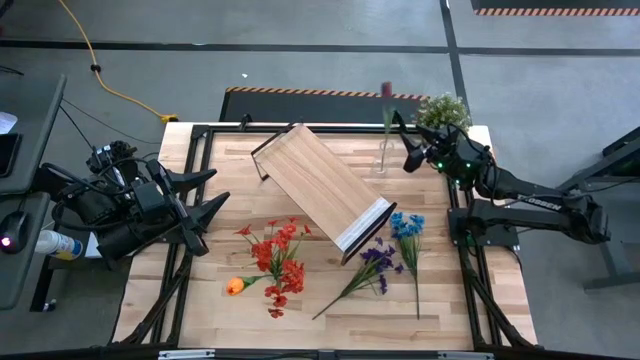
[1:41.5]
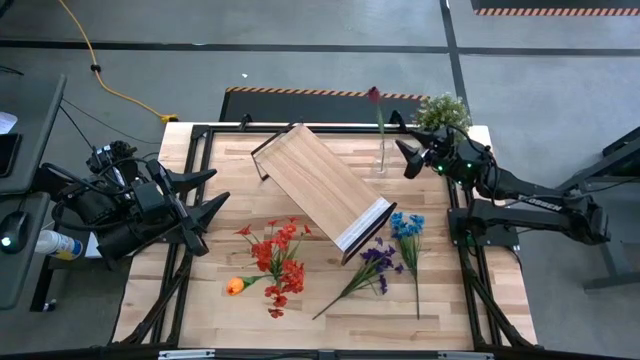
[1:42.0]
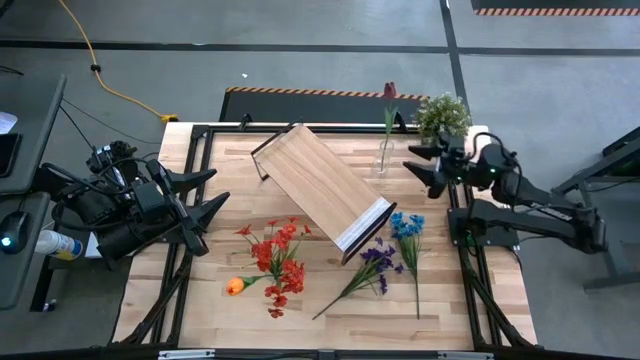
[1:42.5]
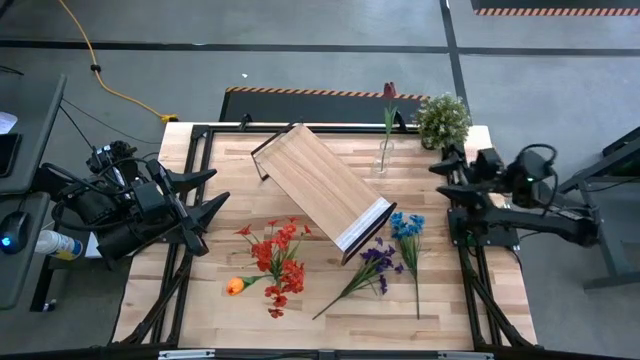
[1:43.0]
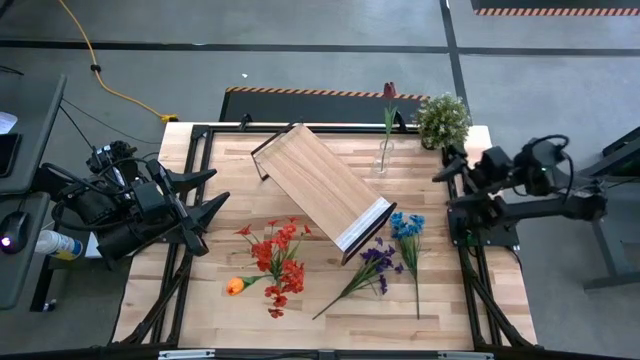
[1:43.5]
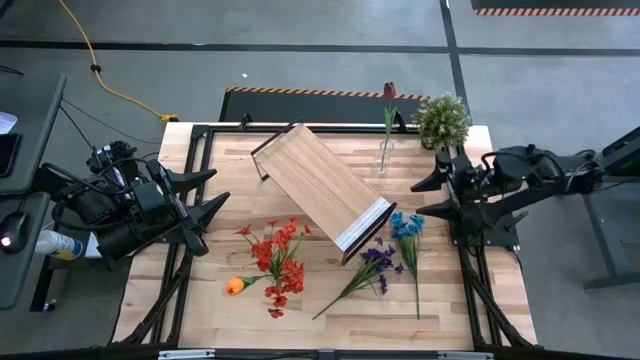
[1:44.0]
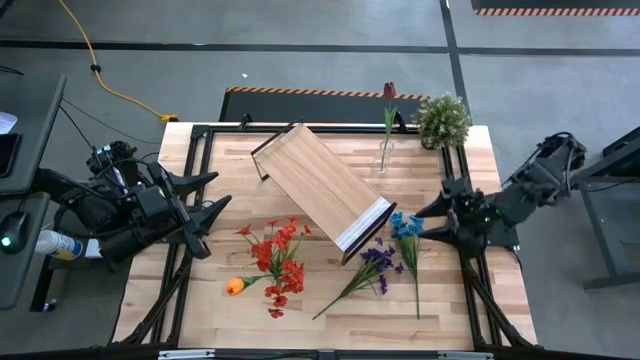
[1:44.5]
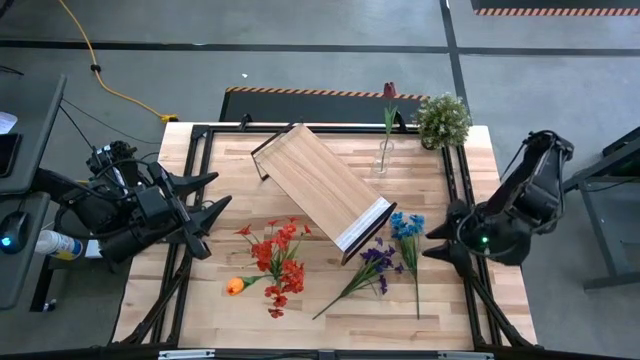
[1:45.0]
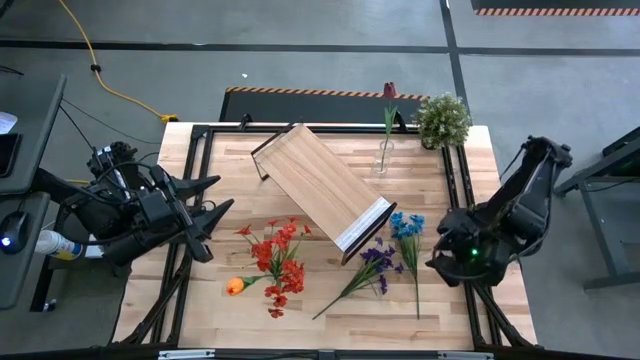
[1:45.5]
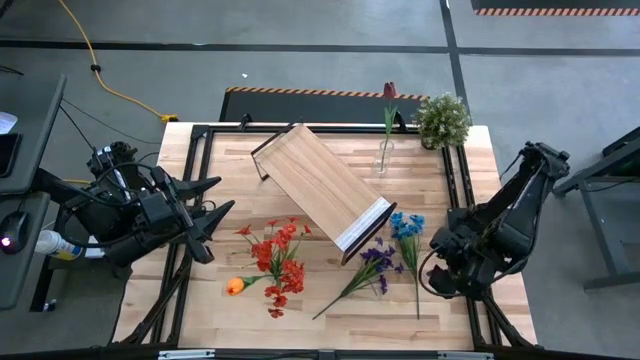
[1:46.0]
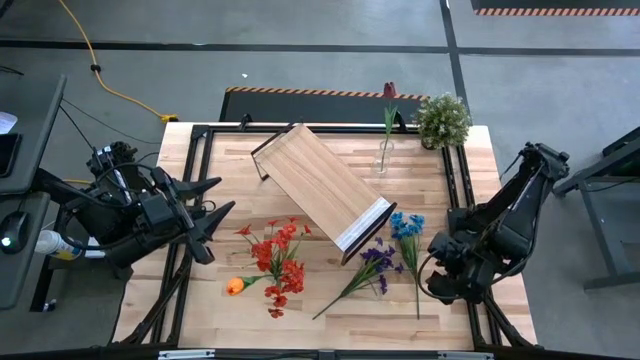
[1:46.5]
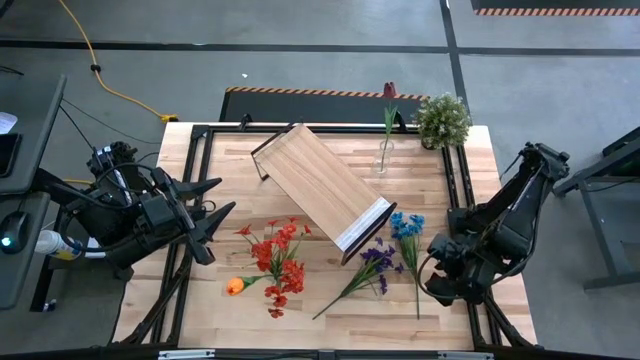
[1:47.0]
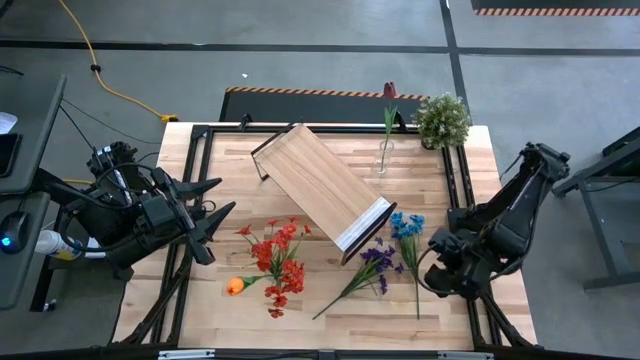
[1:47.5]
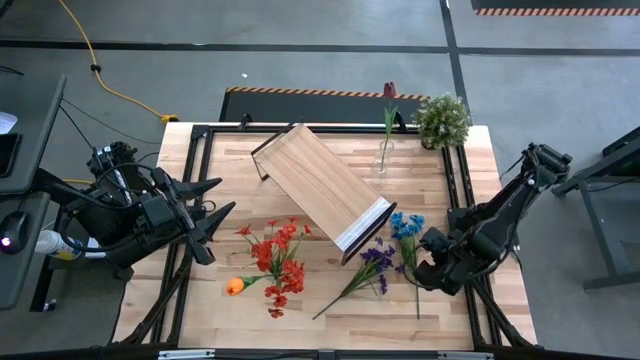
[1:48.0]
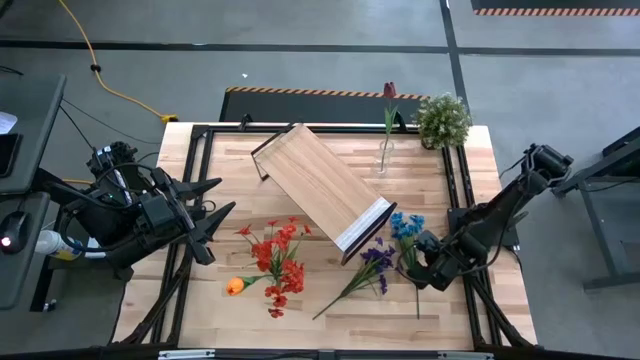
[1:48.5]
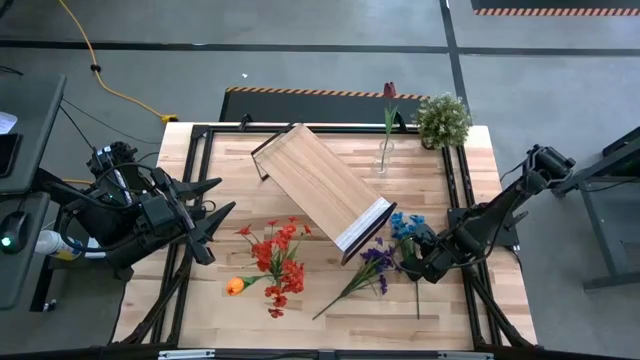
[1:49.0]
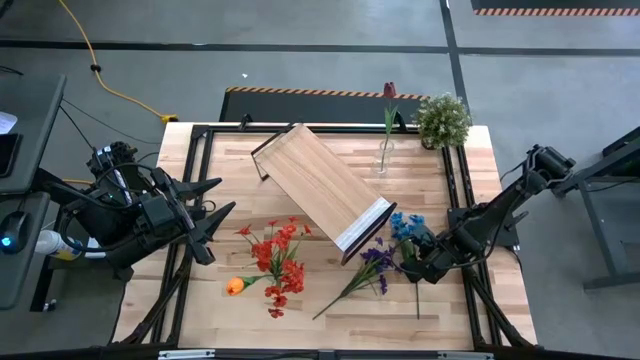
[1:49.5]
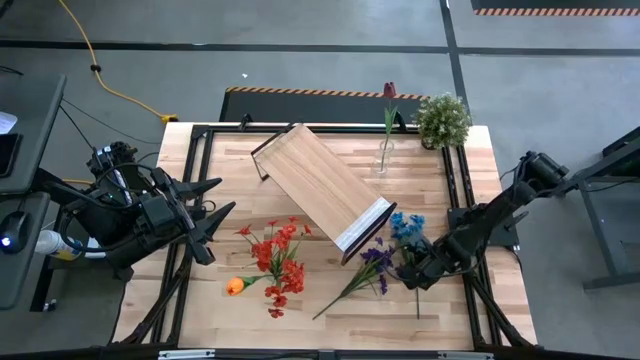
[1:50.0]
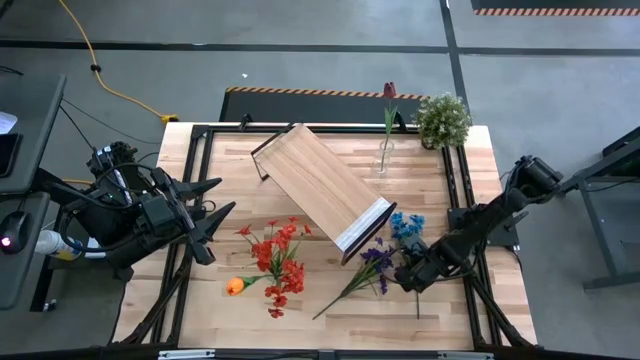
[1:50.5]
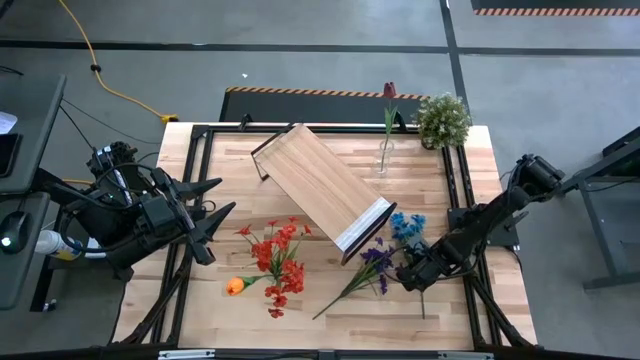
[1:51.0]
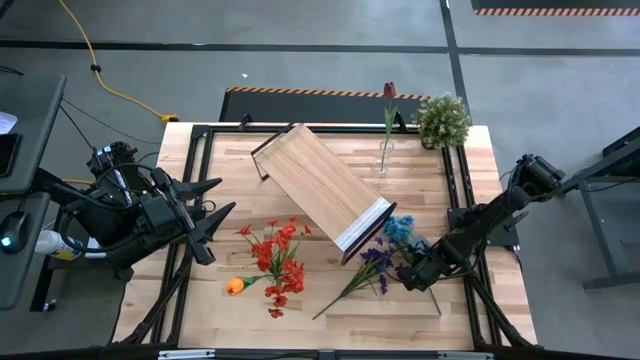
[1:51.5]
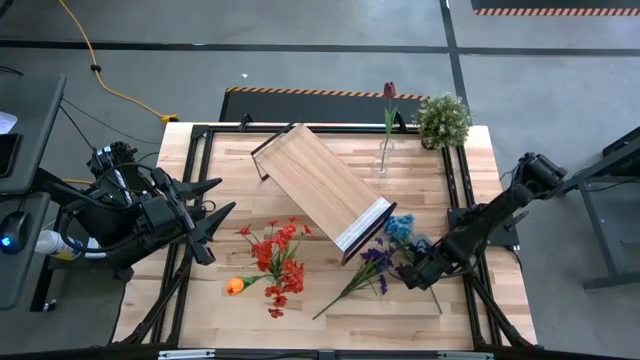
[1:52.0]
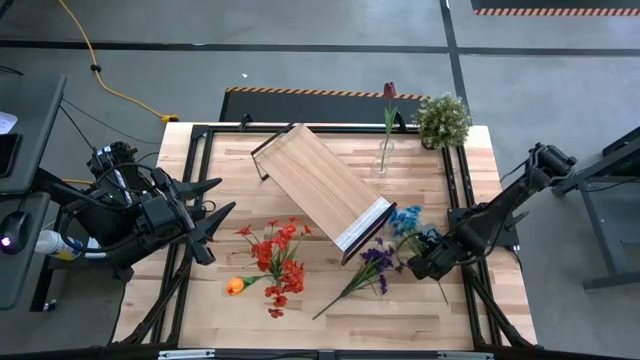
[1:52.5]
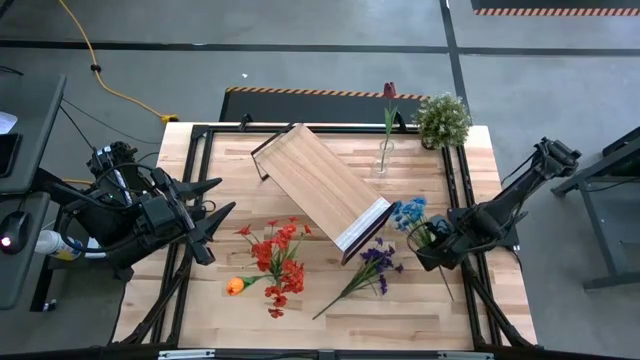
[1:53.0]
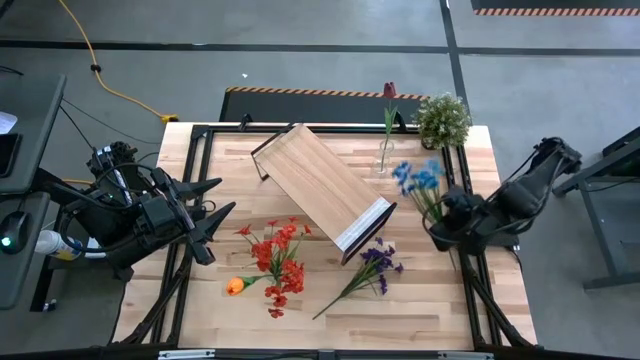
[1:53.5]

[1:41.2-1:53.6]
Task: Pick and place flowers into a vace then onto a shelf
Put the blue flowers into the top transparent vase

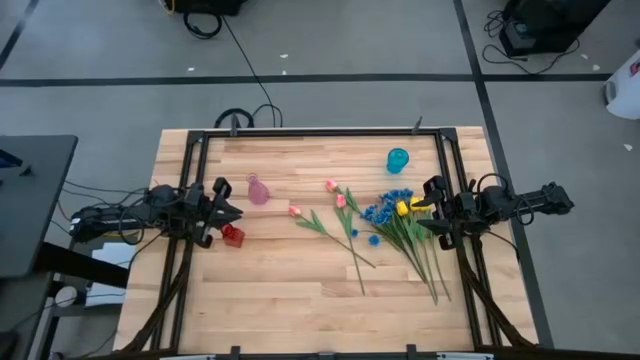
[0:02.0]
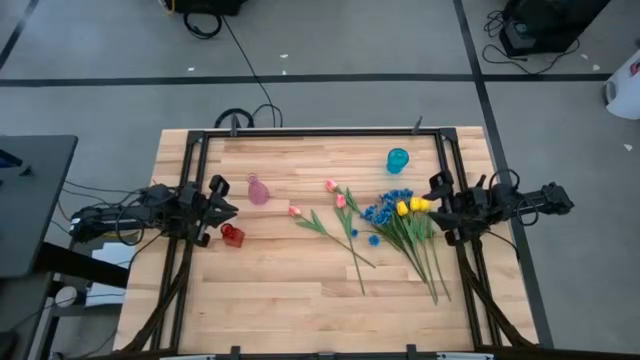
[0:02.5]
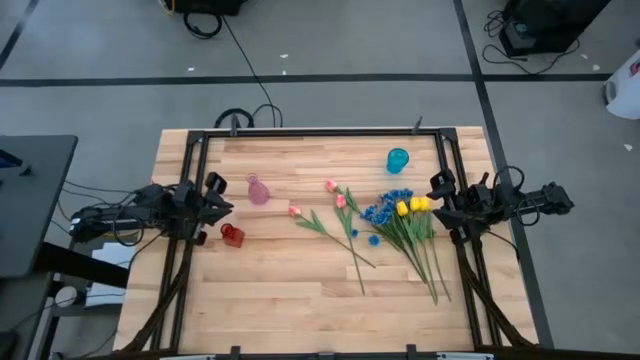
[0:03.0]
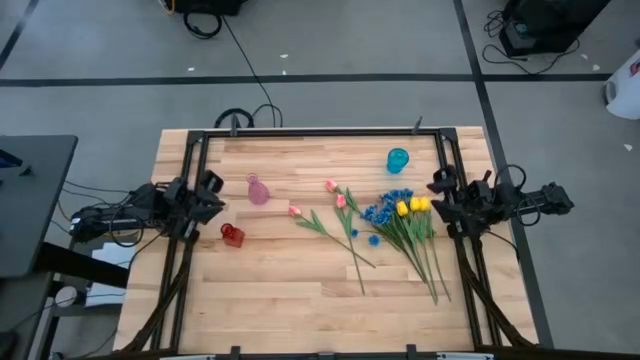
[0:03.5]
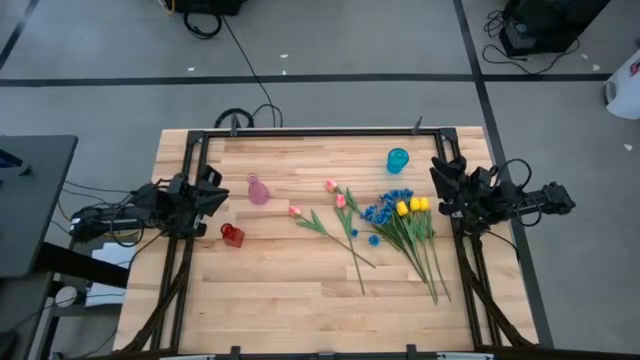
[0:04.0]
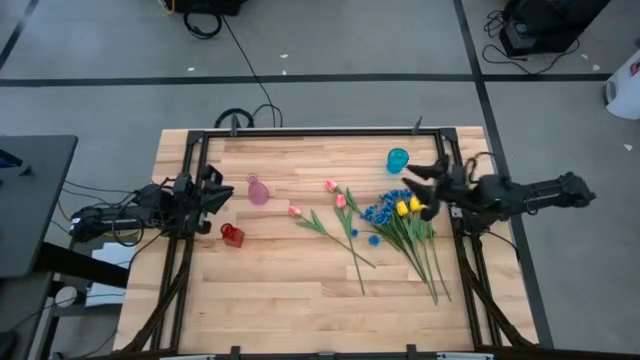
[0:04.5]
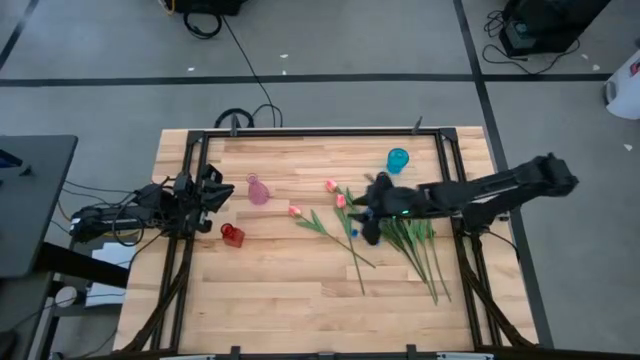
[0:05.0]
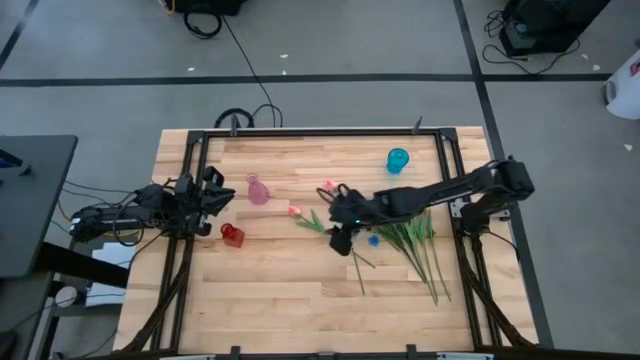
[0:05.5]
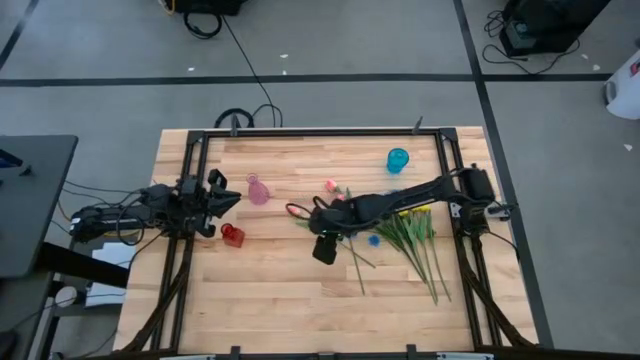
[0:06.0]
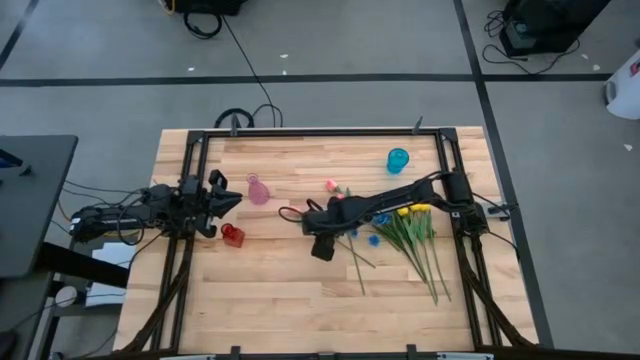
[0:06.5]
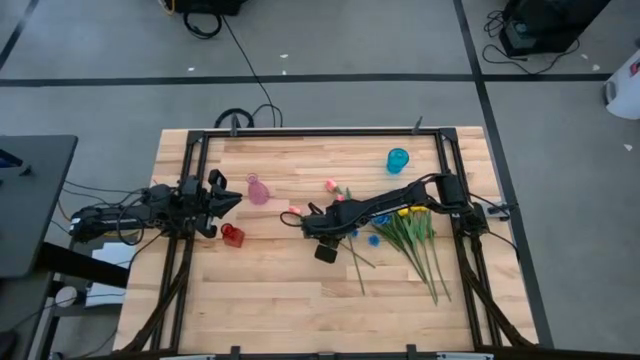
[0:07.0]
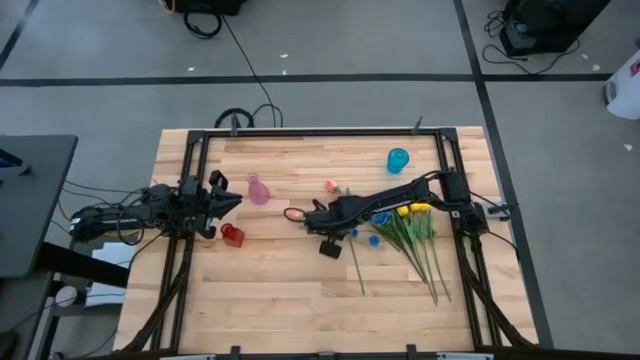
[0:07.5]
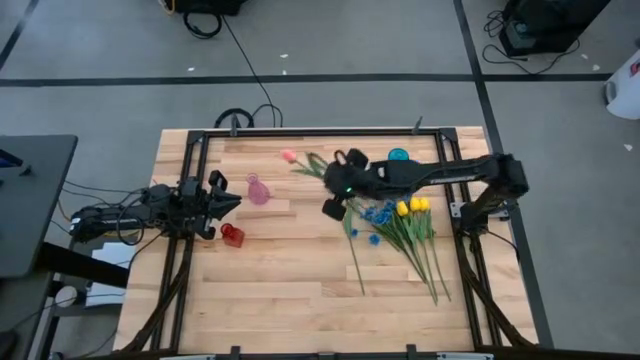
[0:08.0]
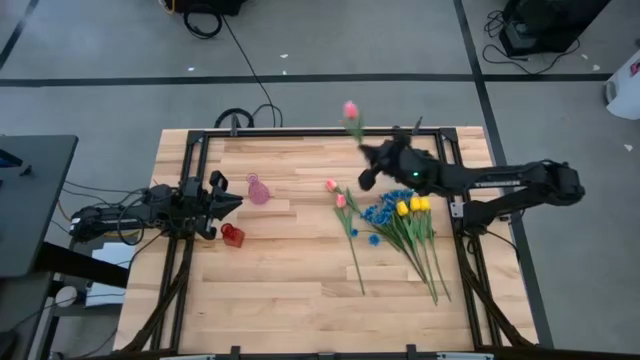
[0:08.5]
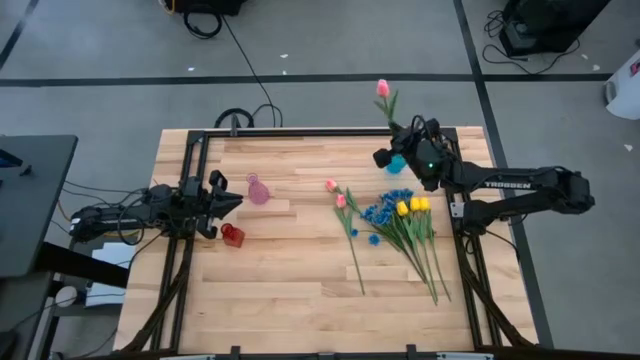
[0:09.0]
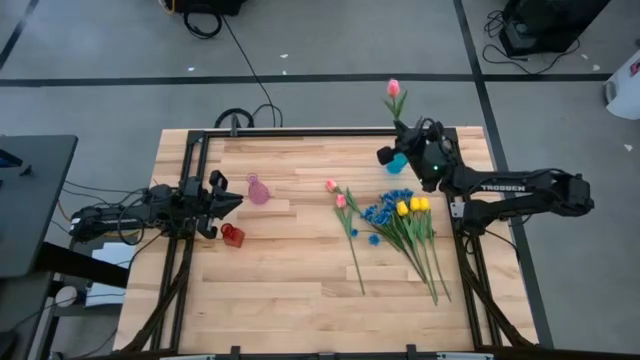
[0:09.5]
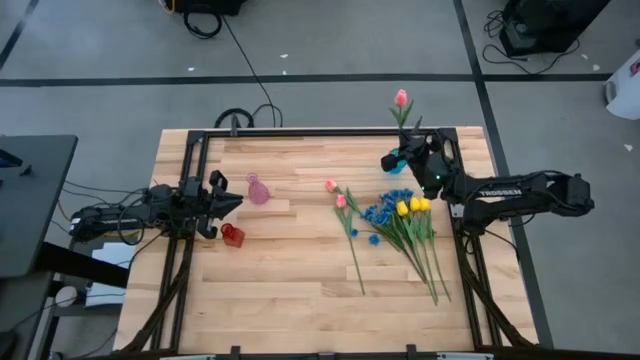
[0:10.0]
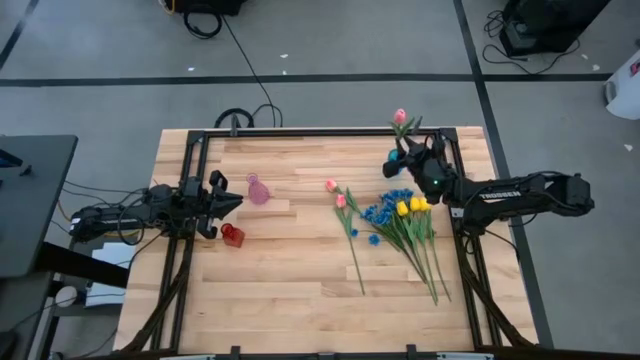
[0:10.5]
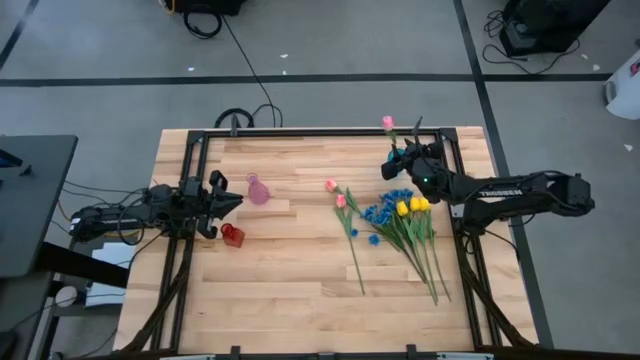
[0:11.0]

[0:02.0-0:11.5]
Task: Sort flowers into vase by color
Put the left pink flower into the blue vase
